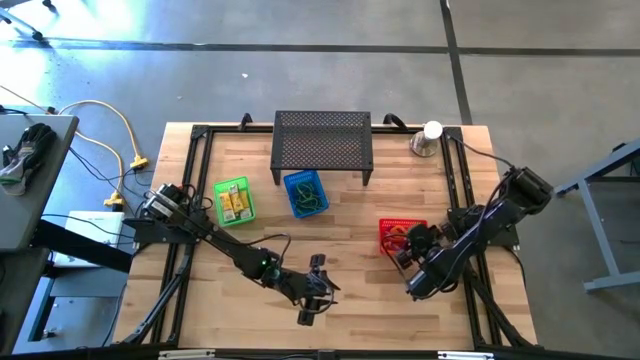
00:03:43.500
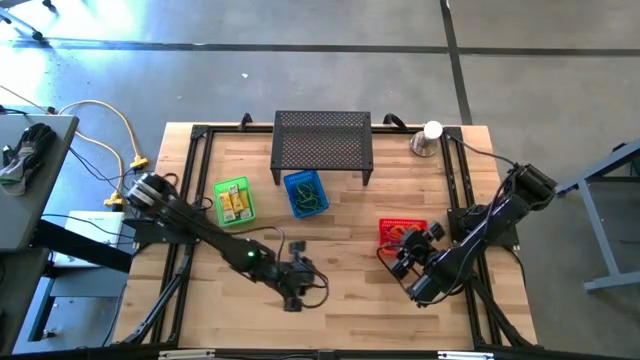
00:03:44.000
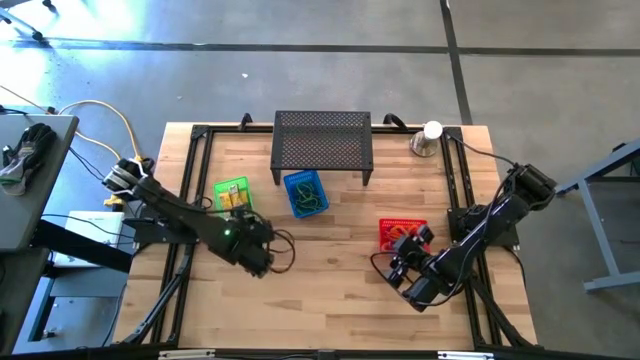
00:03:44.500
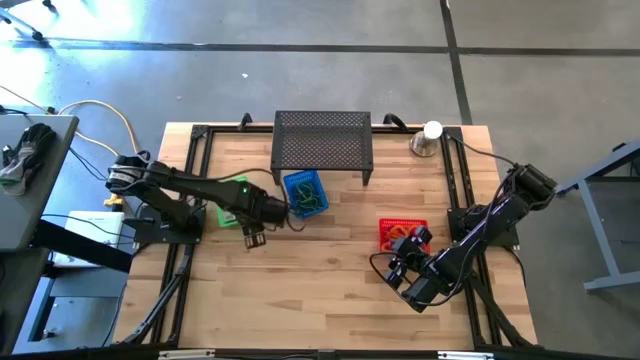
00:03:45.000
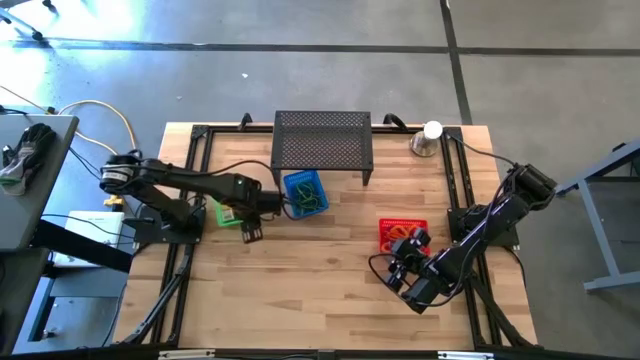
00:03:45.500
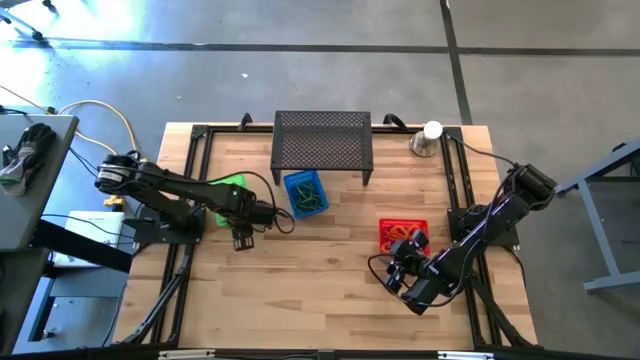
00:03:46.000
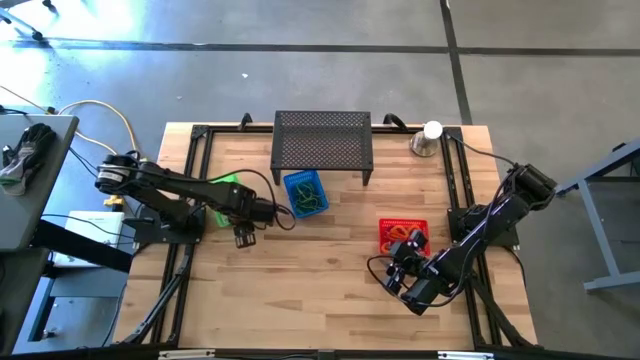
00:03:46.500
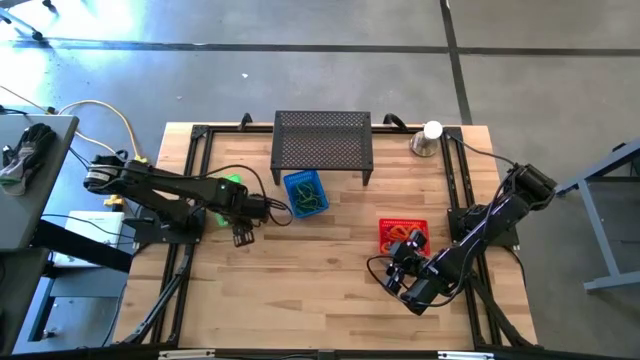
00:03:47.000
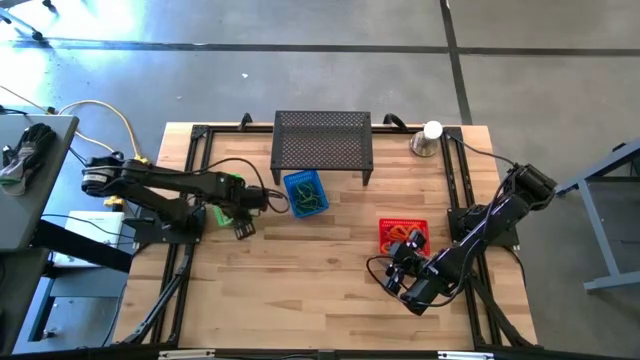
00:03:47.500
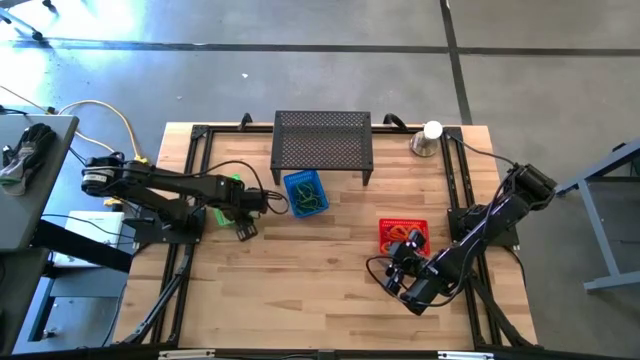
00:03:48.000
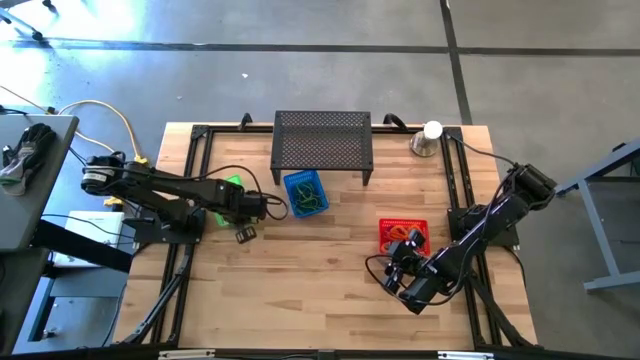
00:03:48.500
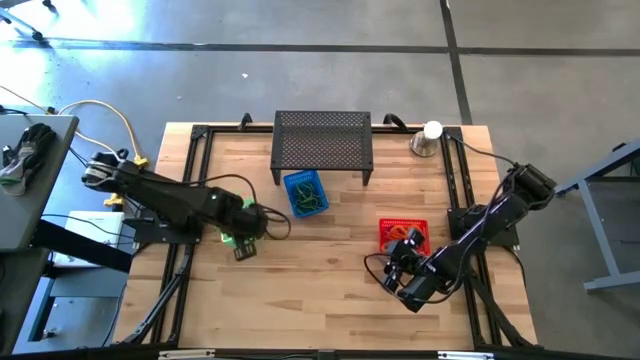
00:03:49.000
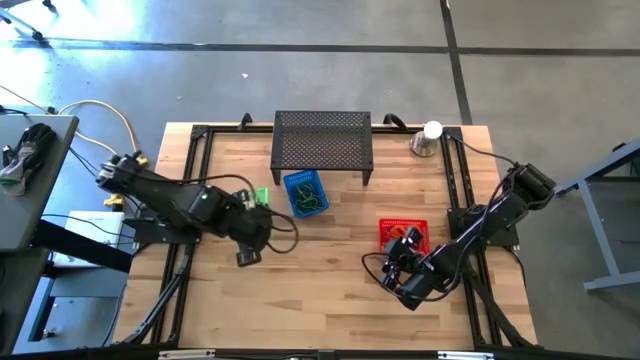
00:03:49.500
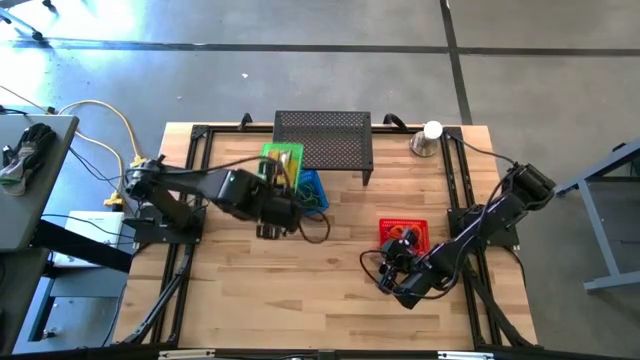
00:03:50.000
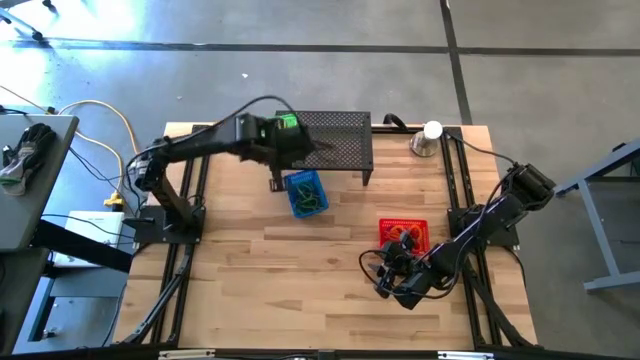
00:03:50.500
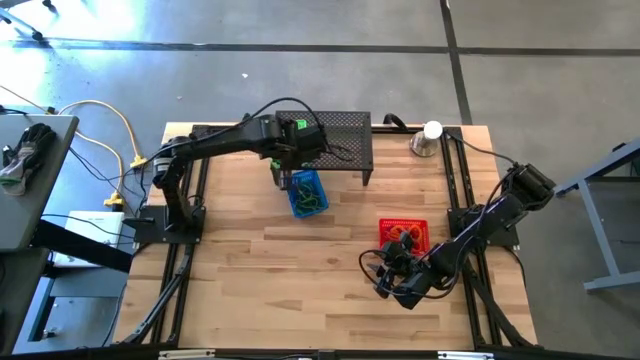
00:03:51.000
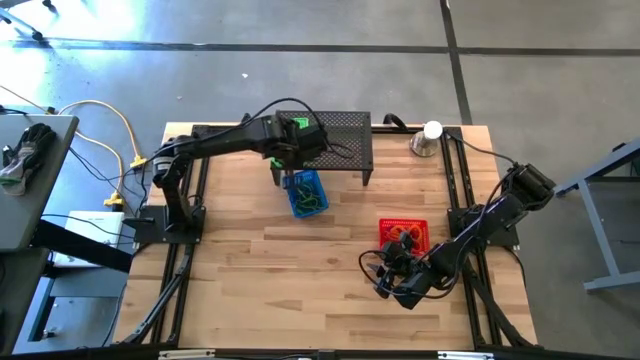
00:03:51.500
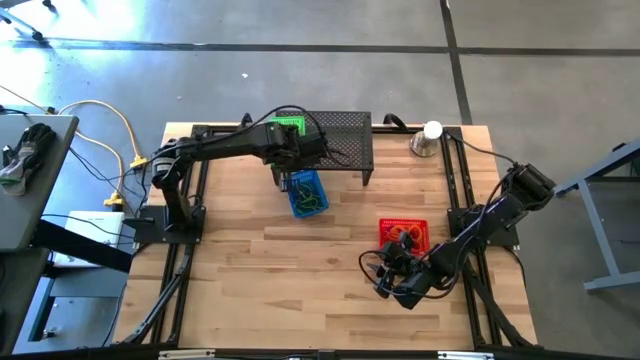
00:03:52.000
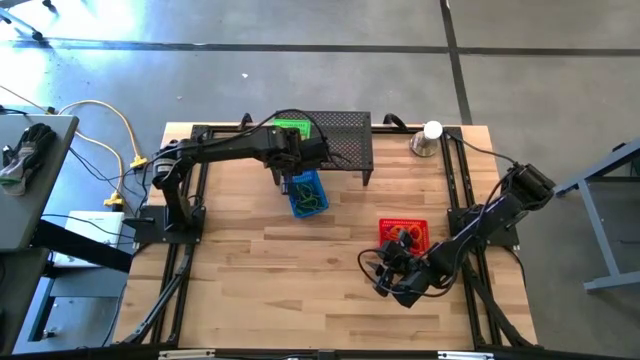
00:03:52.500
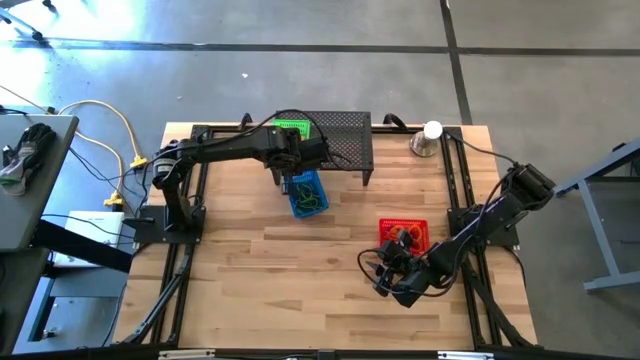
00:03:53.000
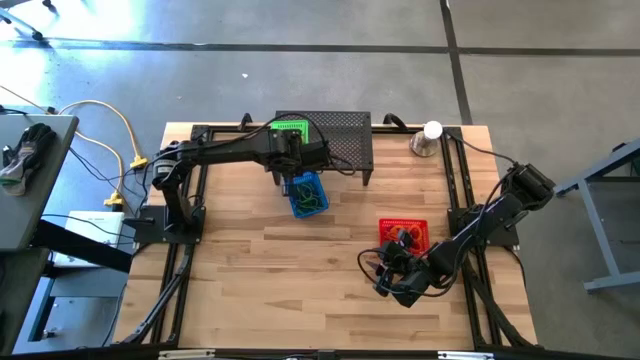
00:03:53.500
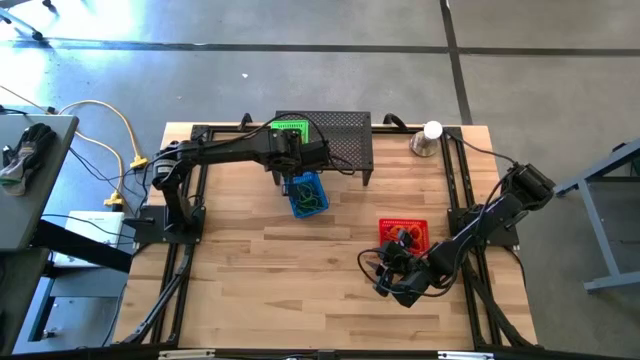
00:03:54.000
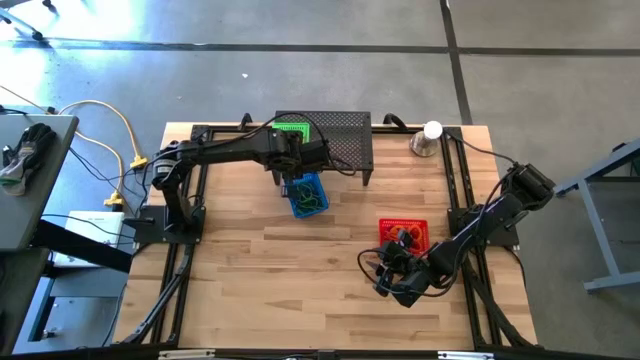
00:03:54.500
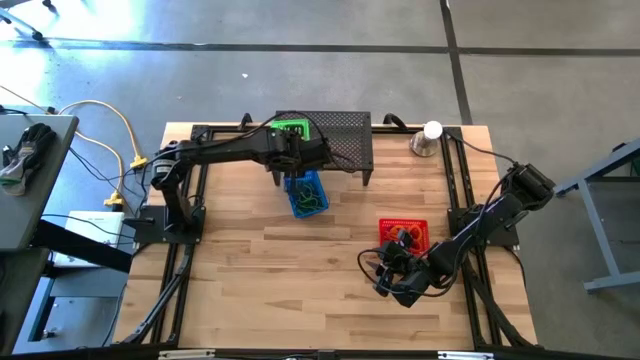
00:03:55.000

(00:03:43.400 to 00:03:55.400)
Task: Pick & Place Office Desk Supplies
Put the green basket with the crayon boxes on the shelf

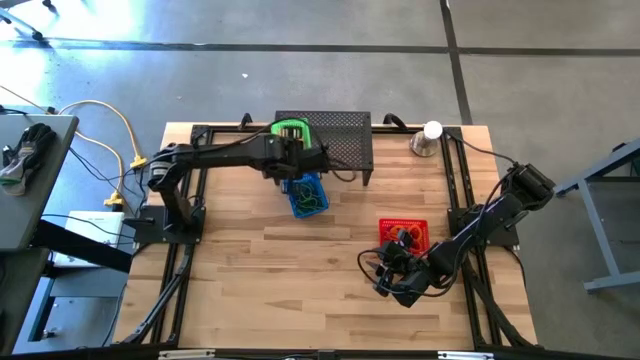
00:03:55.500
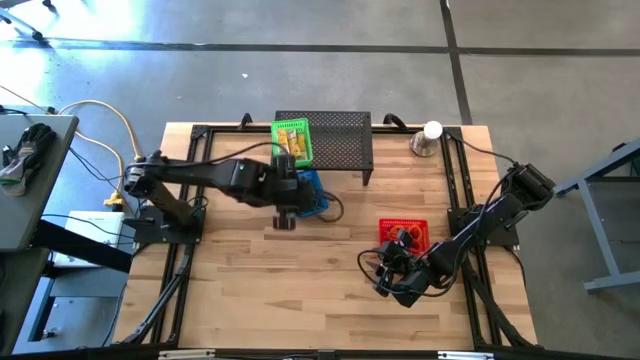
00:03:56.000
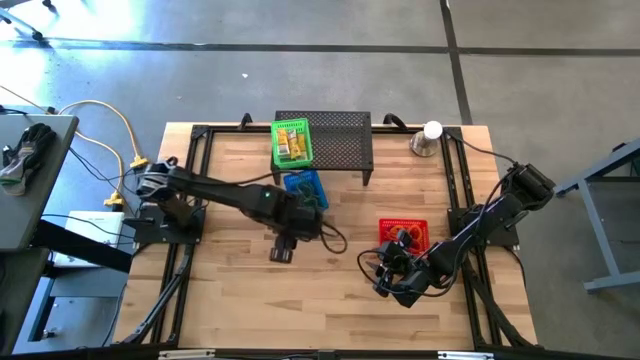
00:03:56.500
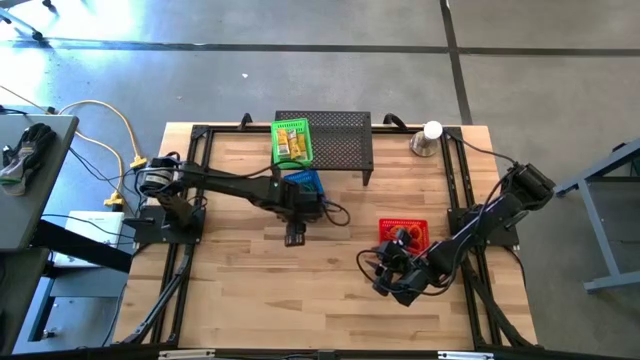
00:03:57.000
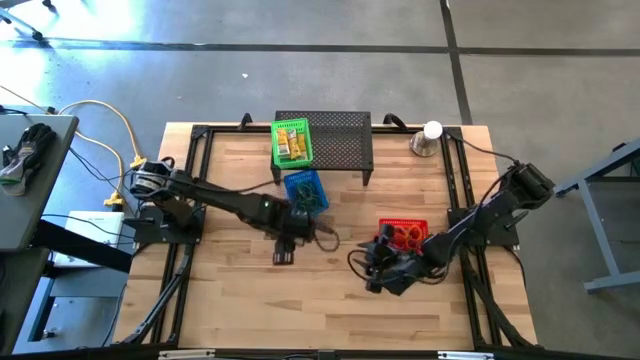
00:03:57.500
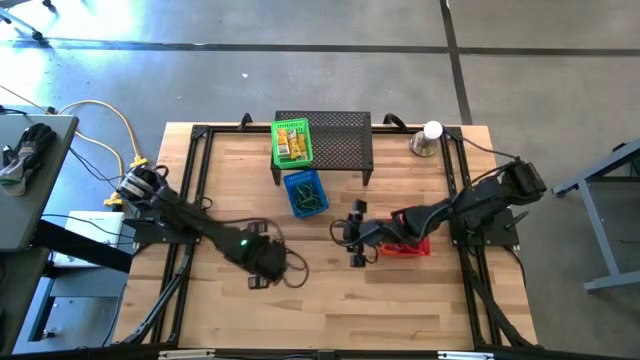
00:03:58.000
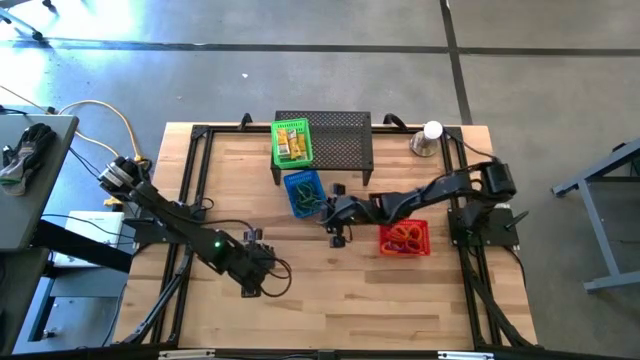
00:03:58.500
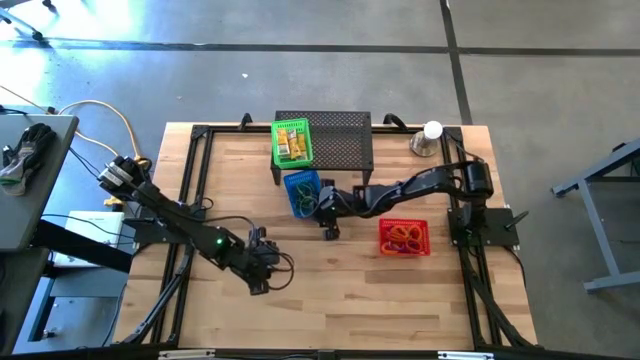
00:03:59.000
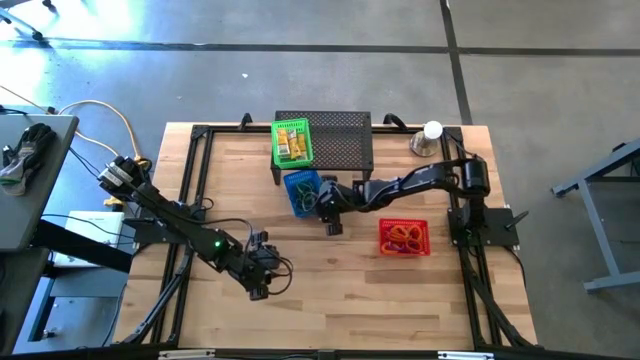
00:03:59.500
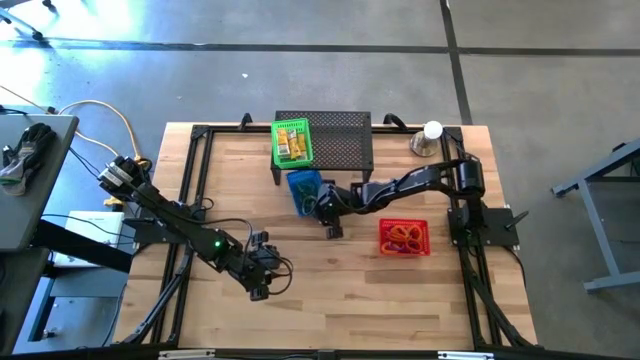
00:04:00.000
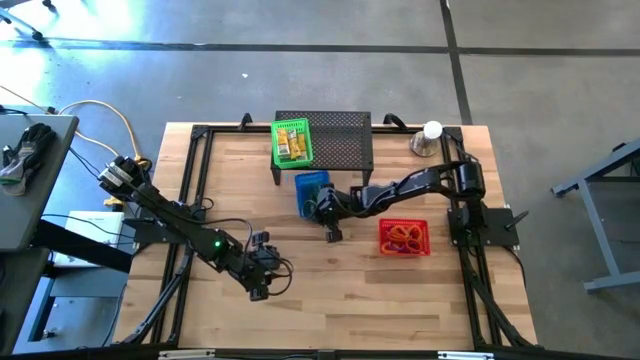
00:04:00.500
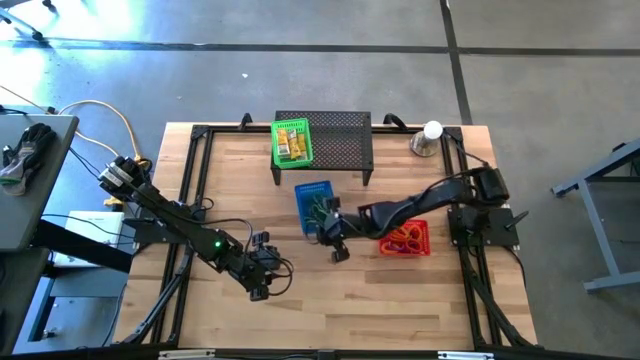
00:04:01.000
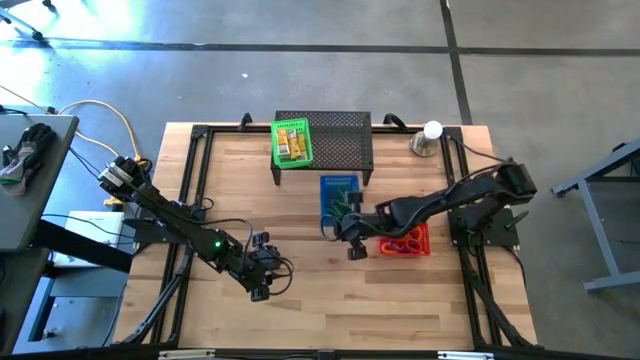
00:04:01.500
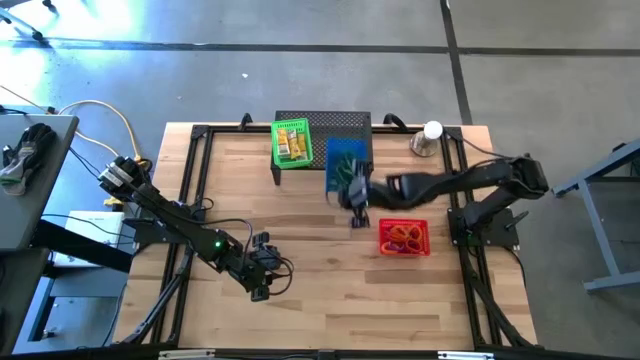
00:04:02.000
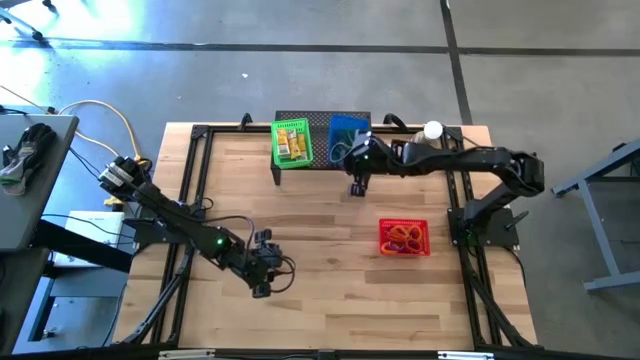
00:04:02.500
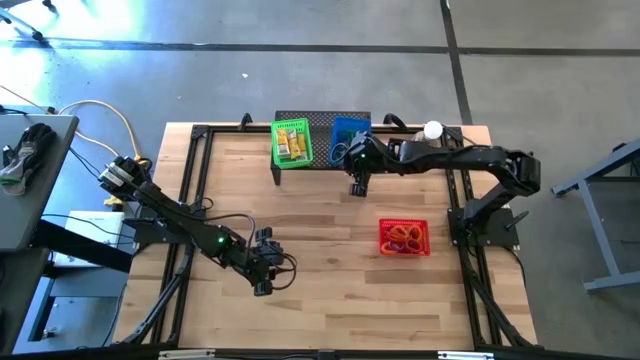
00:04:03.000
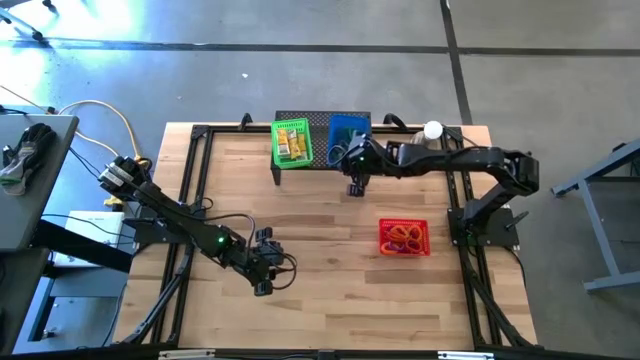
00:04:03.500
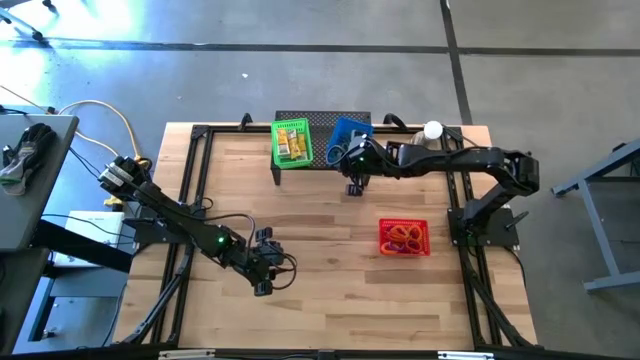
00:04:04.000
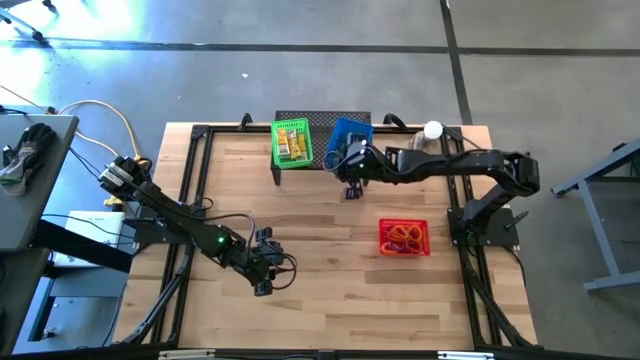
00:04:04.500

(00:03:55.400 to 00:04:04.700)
Put the blue basket with the rubber bands on the shelf
